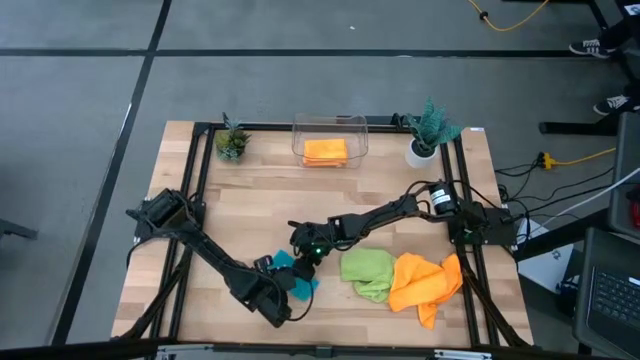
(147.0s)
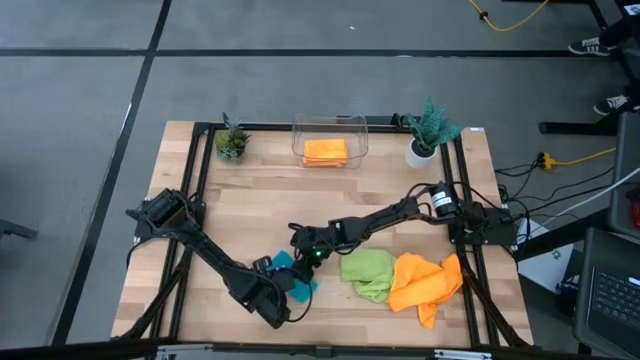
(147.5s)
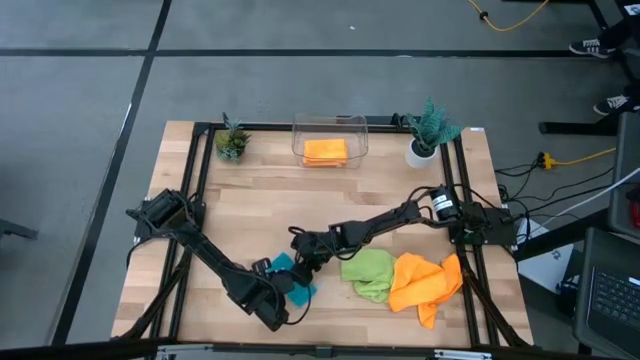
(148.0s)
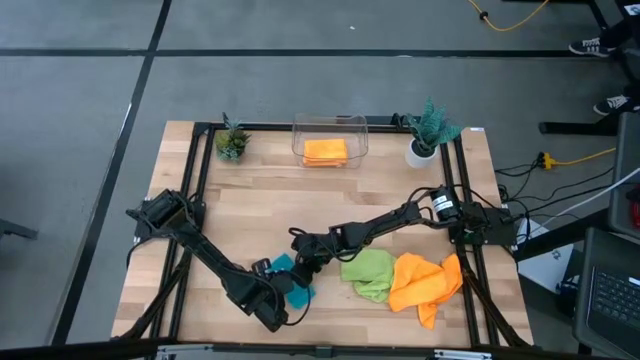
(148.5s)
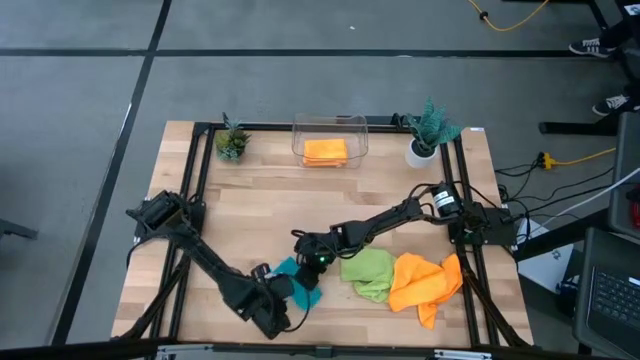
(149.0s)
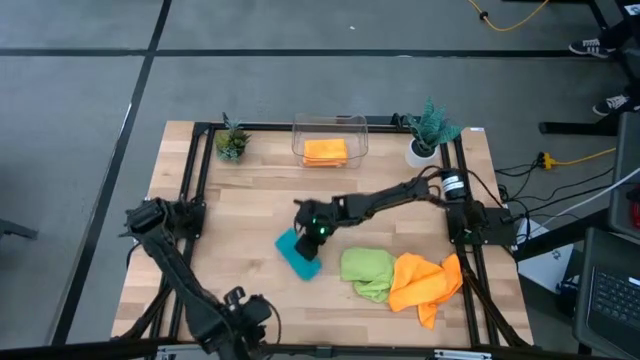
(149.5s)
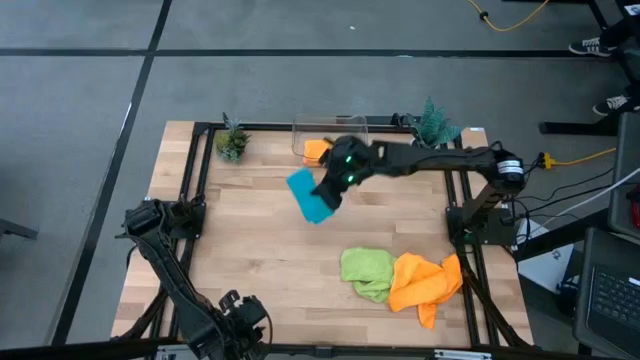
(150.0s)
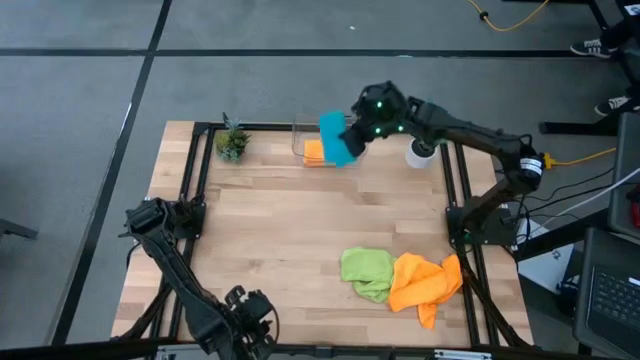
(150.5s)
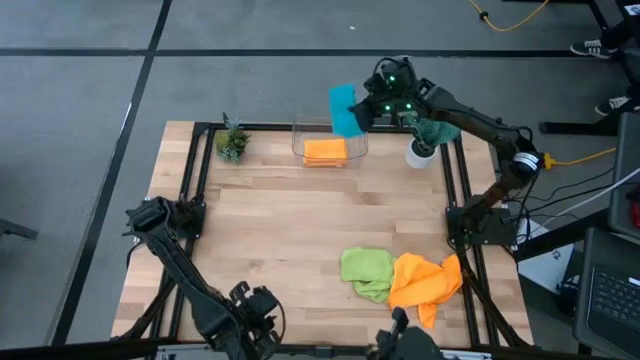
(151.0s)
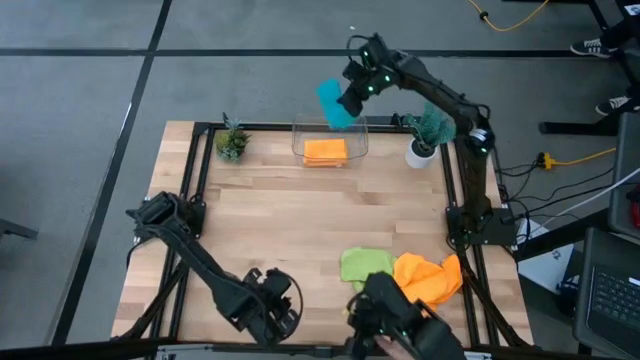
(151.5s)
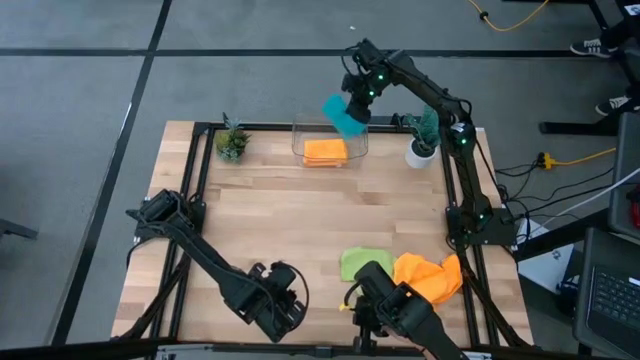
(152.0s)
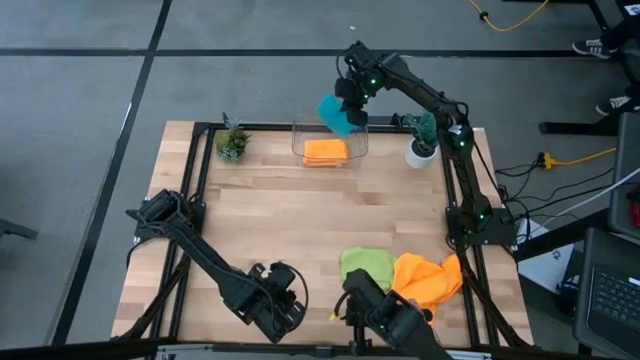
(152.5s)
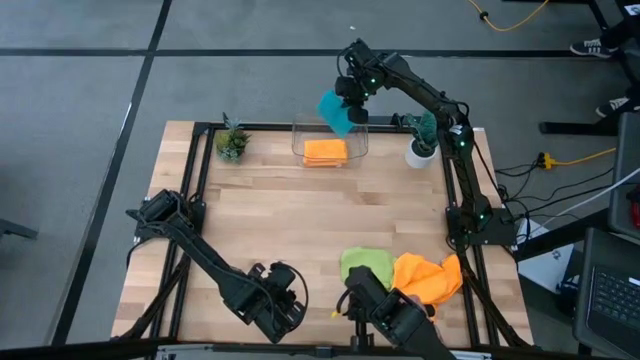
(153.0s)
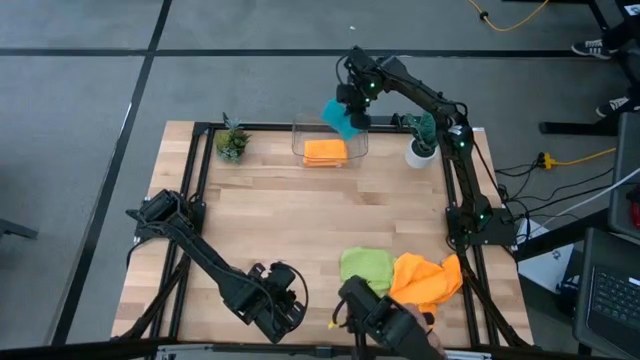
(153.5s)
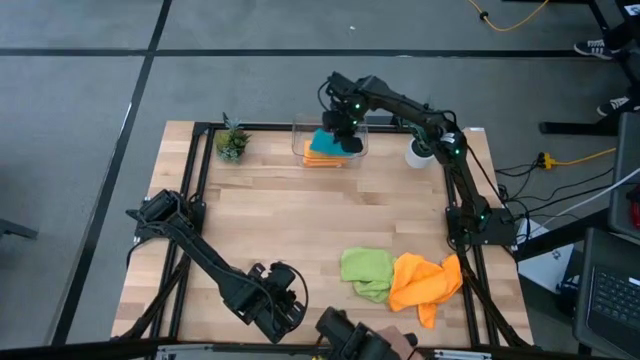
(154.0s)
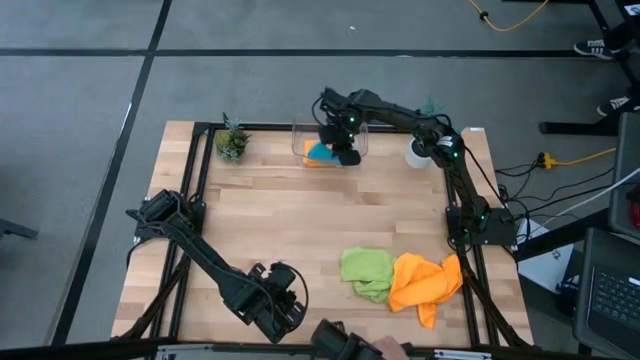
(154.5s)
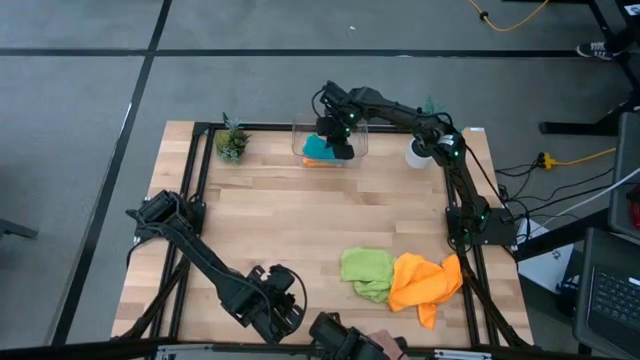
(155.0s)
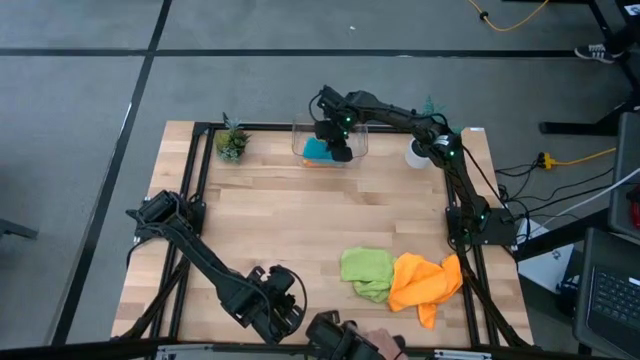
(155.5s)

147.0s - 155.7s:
Task: Fold microfiber towels
Put the folded blue towel into the transparent bin

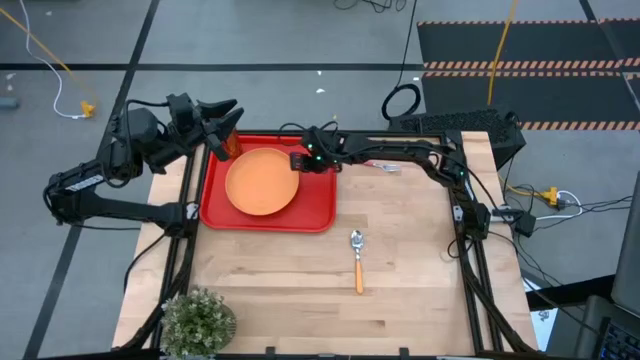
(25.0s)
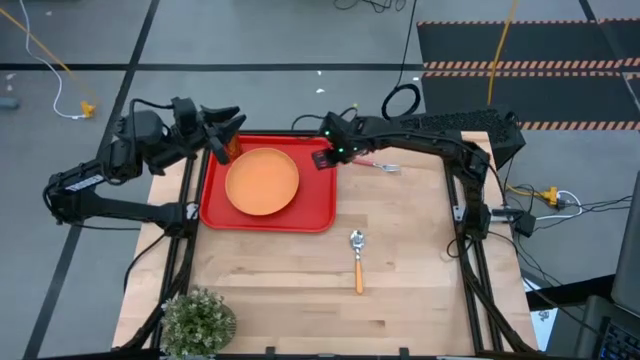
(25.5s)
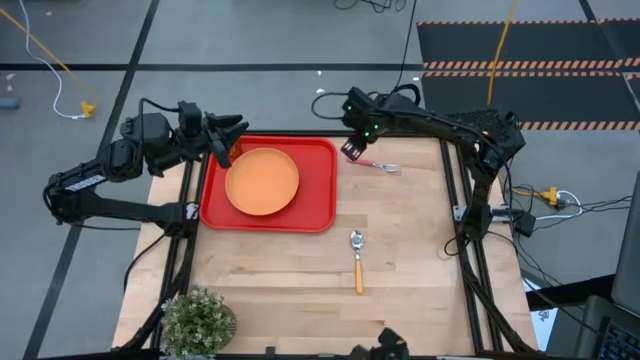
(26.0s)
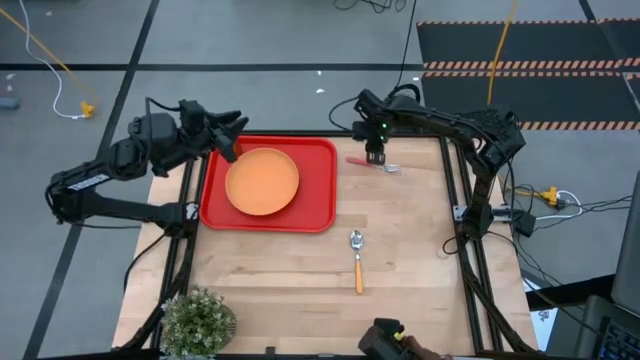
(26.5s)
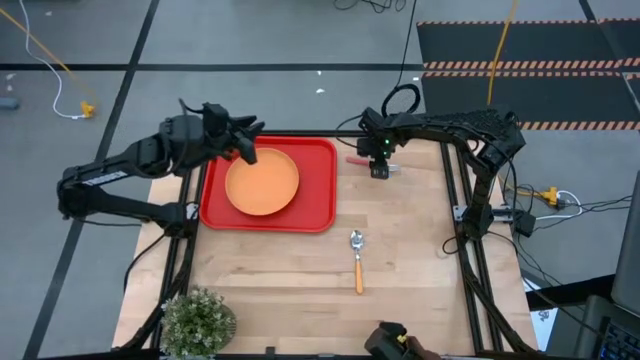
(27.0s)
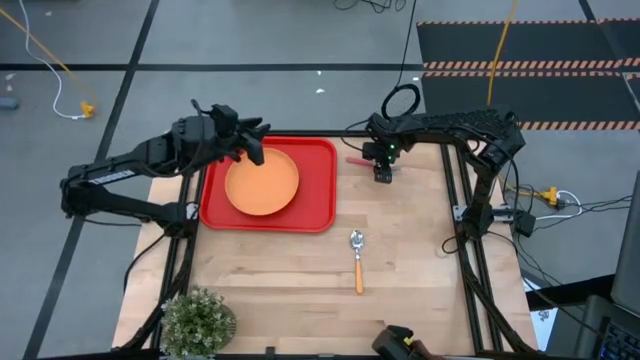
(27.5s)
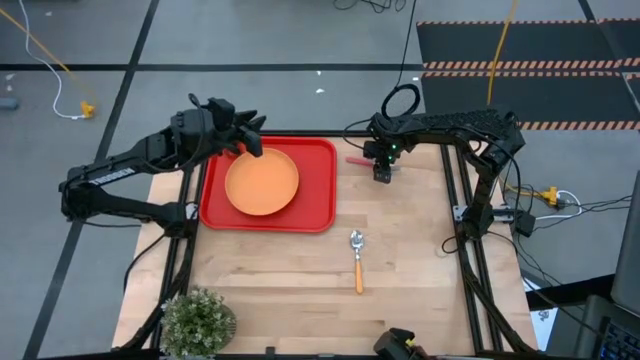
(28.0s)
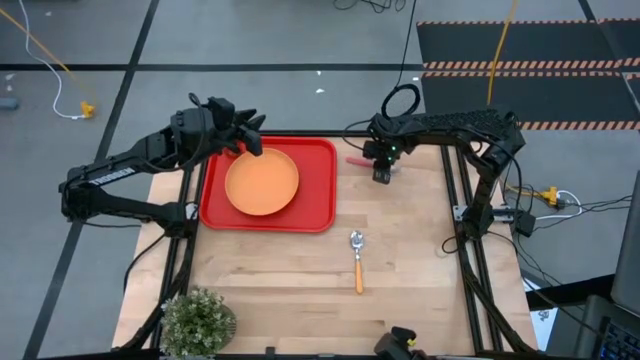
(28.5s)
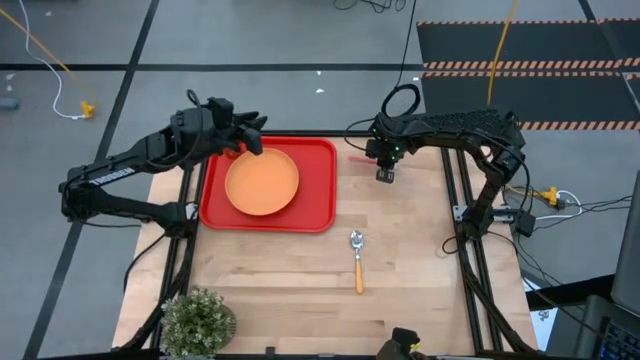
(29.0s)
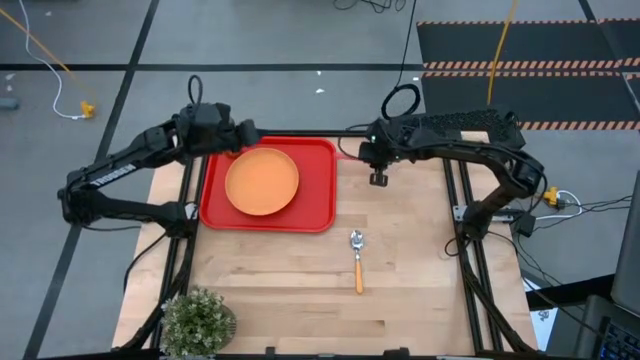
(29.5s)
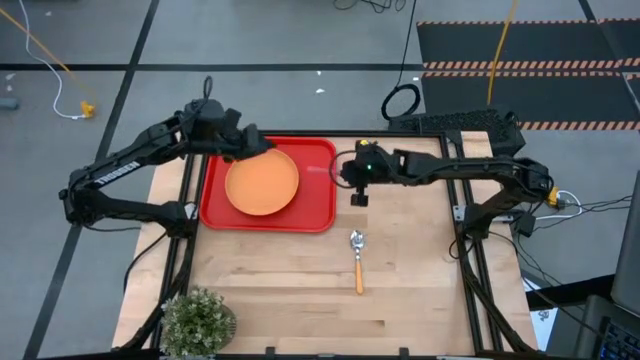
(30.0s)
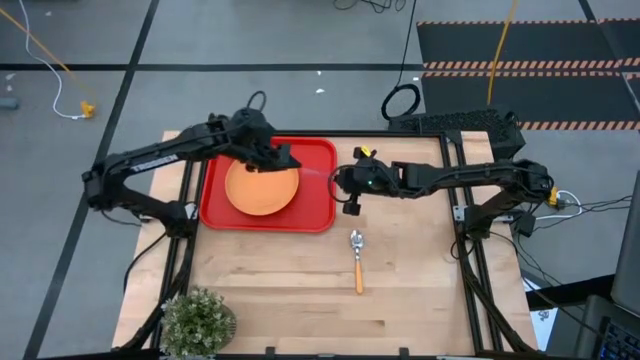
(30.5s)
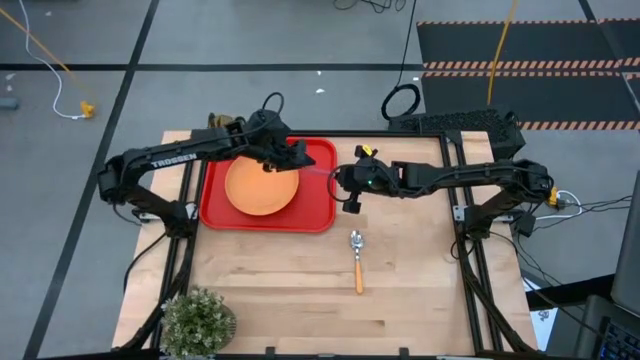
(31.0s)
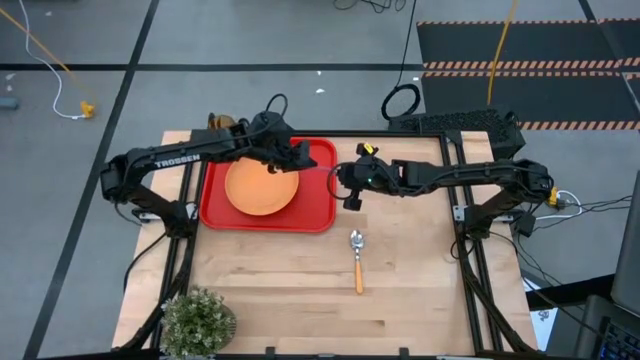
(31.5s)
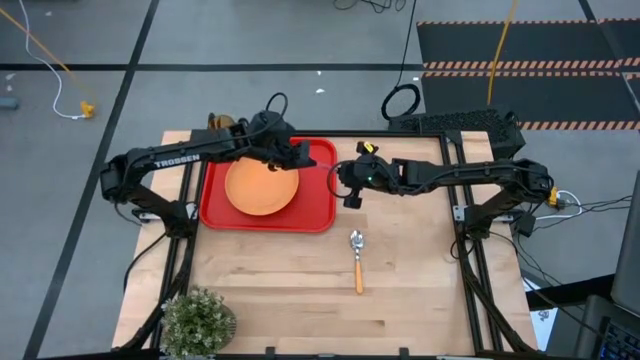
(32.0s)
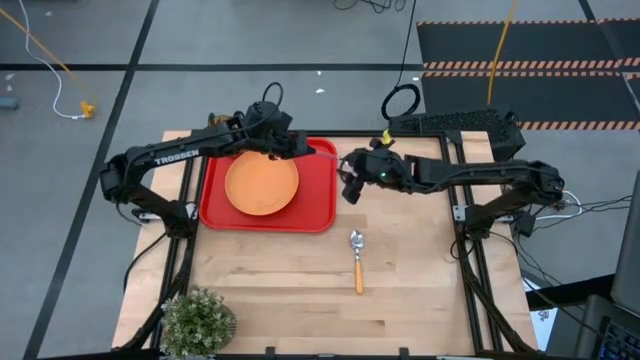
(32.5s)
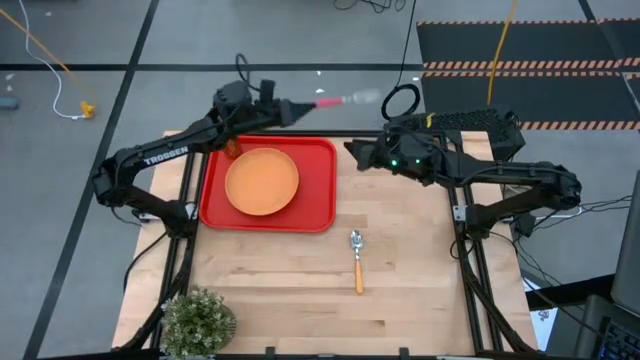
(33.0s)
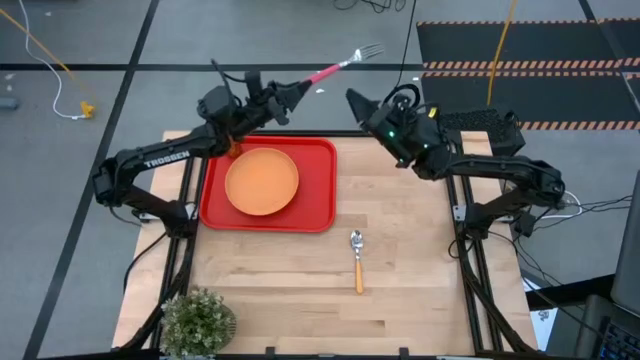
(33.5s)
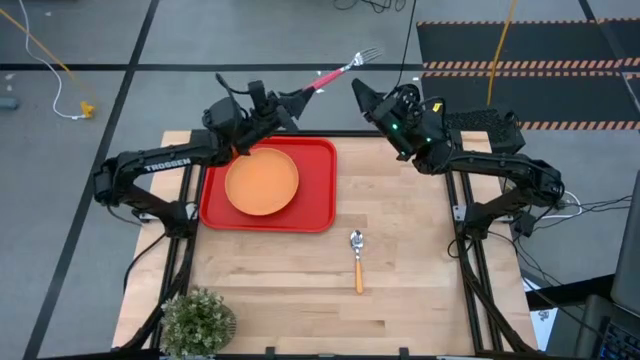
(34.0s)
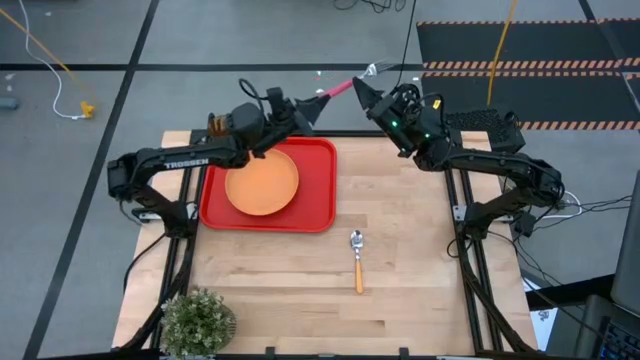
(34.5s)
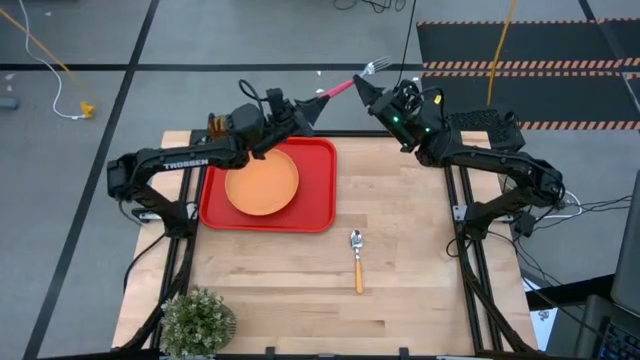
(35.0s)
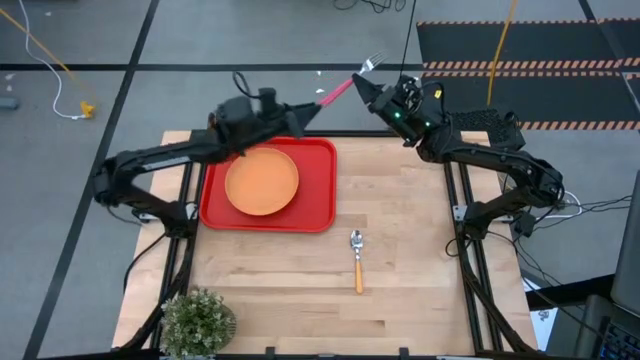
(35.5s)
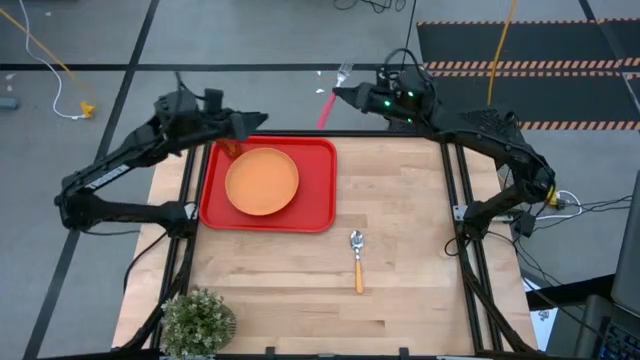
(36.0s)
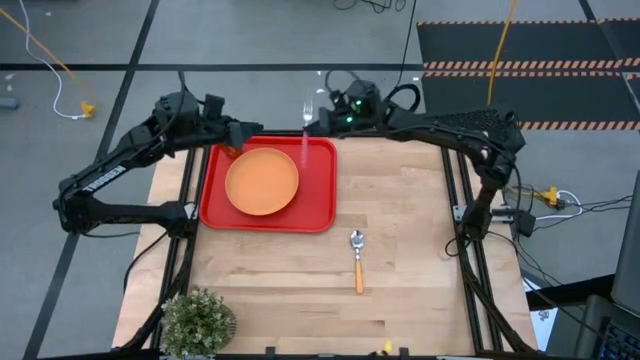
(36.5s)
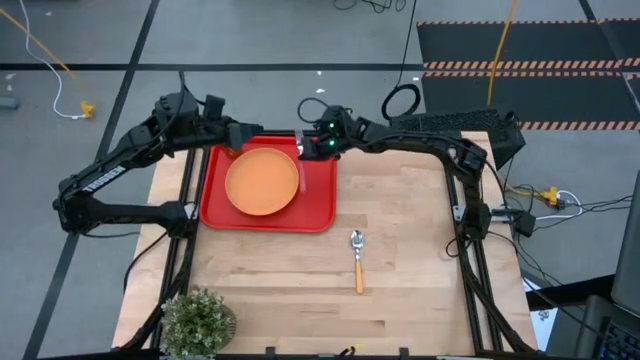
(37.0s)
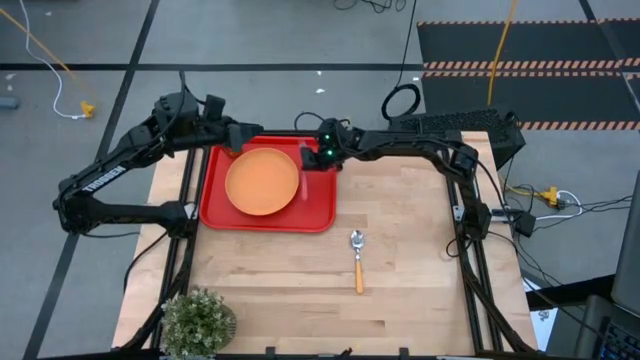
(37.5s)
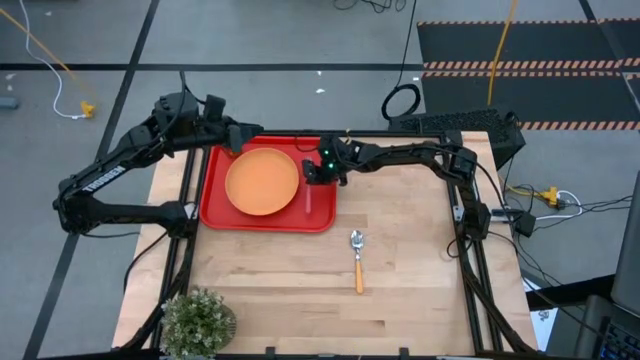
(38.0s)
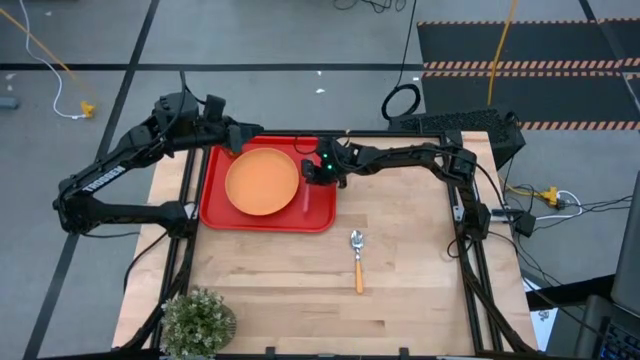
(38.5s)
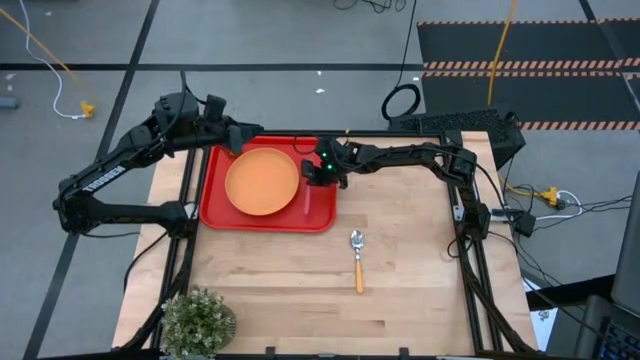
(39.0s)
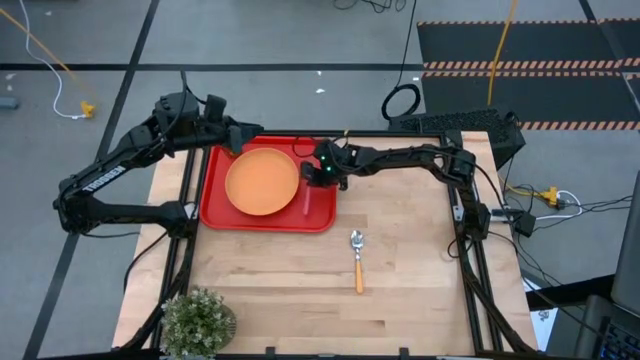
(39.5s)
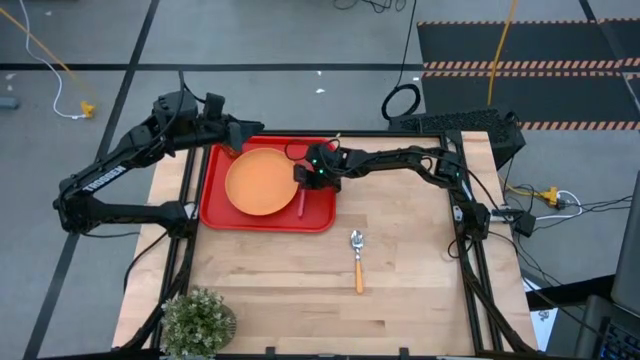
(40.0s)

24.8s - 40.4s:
Task: Pick and place plate/cup/fork/spoon on tray
Put the pink fork on the red serving tray to the right of the orange plate
